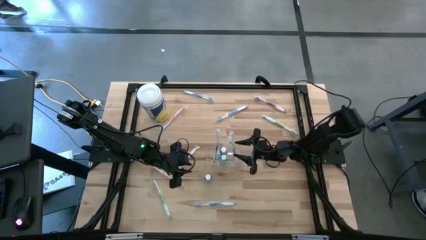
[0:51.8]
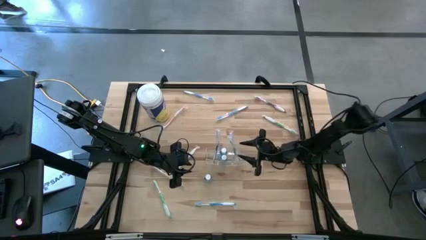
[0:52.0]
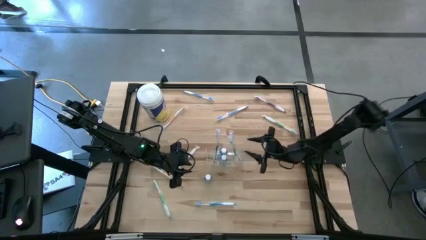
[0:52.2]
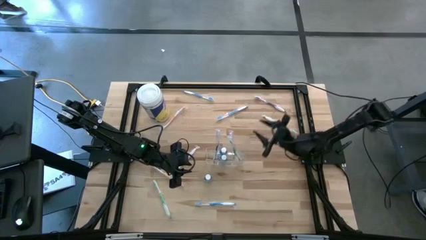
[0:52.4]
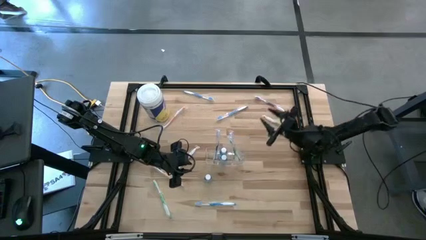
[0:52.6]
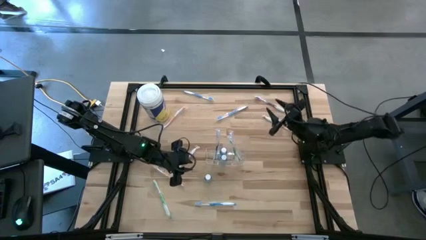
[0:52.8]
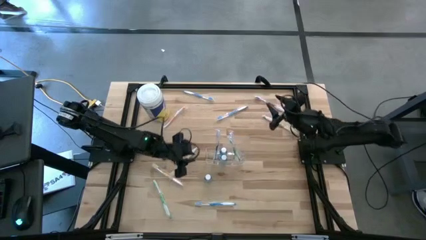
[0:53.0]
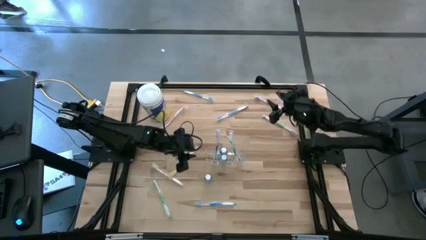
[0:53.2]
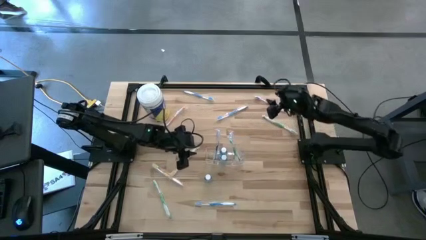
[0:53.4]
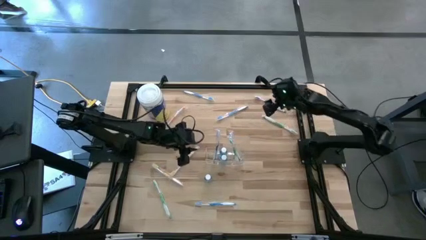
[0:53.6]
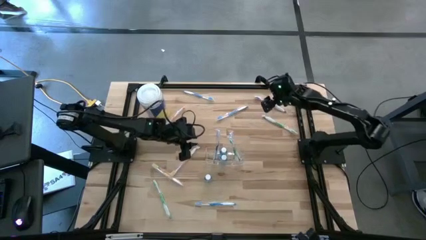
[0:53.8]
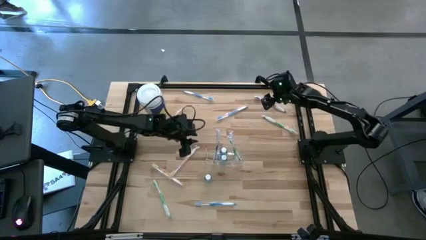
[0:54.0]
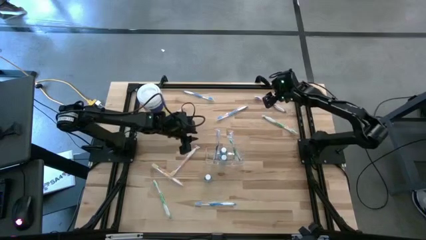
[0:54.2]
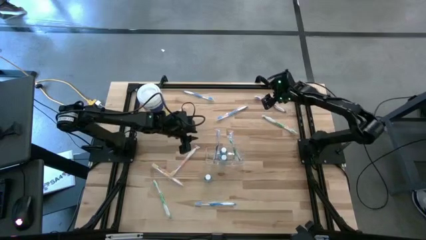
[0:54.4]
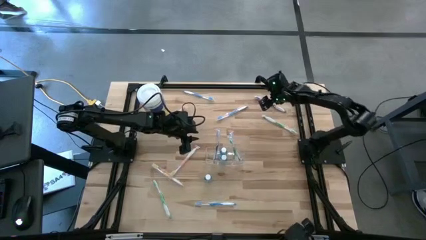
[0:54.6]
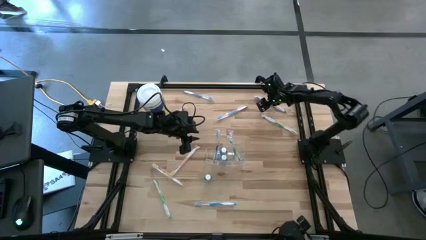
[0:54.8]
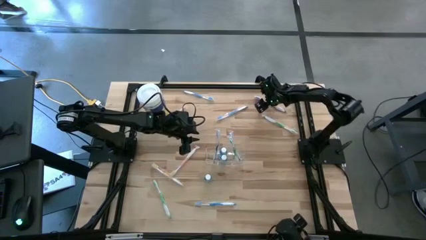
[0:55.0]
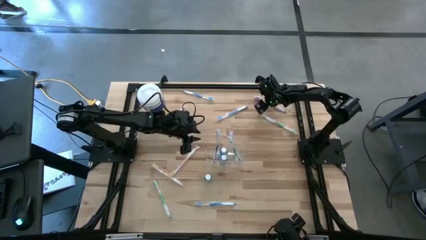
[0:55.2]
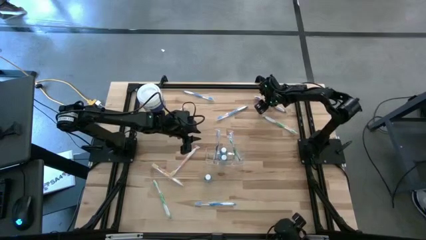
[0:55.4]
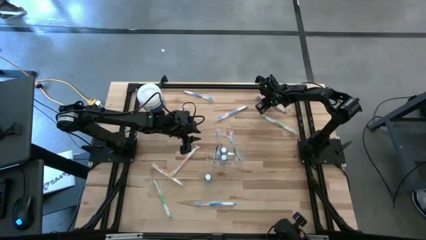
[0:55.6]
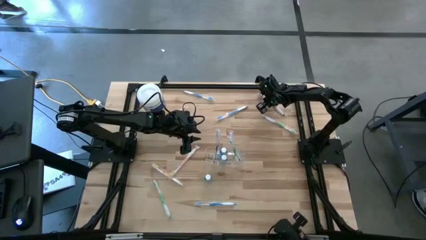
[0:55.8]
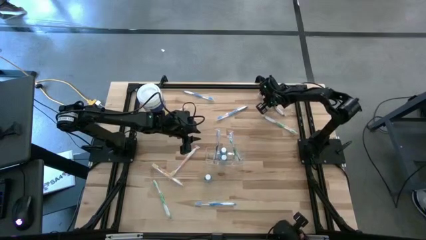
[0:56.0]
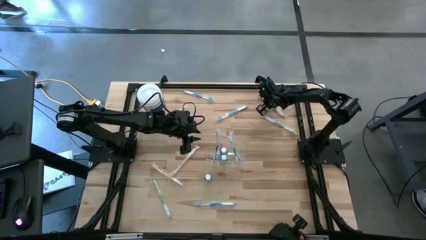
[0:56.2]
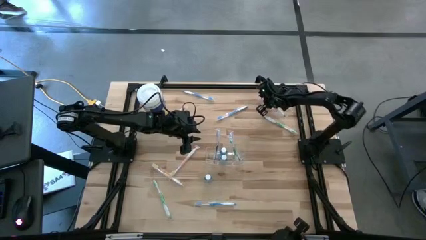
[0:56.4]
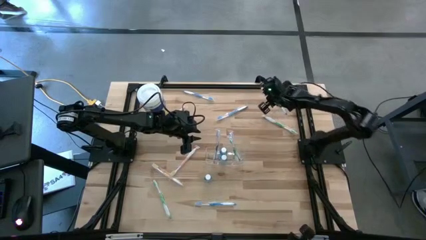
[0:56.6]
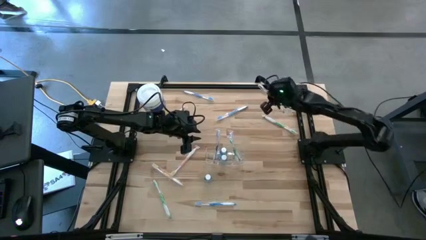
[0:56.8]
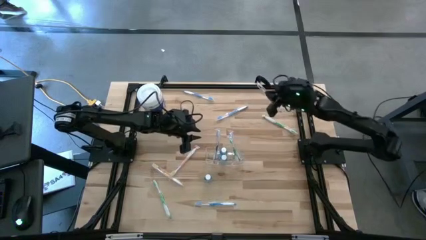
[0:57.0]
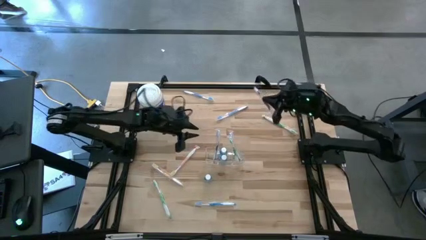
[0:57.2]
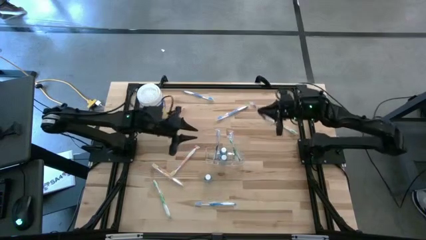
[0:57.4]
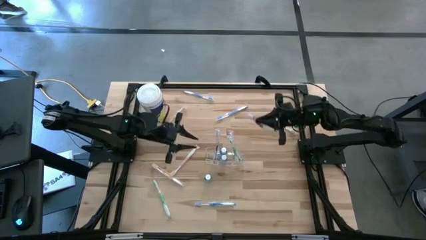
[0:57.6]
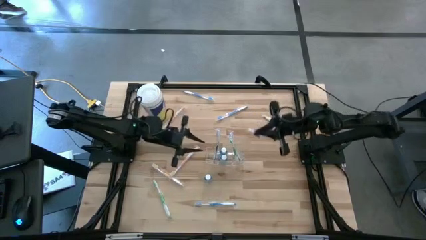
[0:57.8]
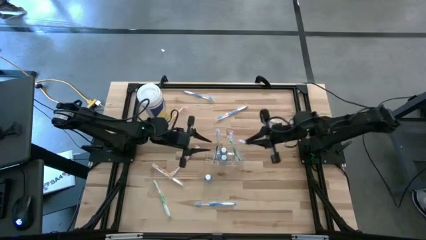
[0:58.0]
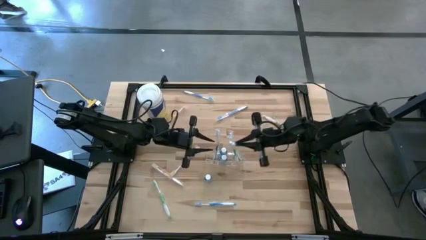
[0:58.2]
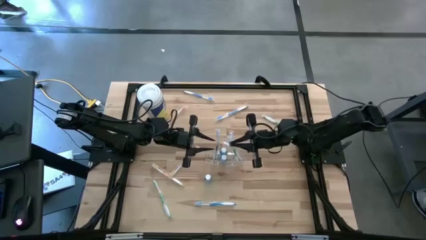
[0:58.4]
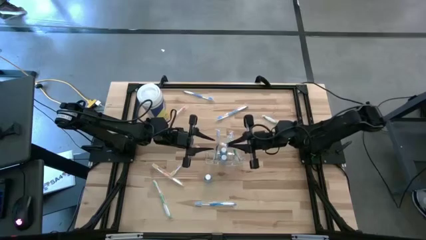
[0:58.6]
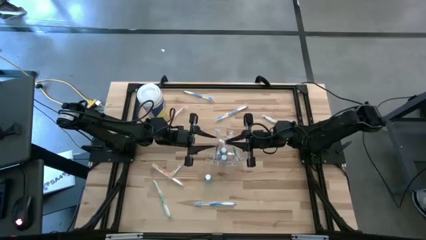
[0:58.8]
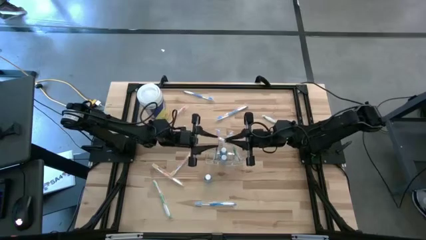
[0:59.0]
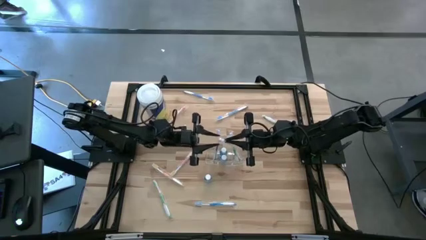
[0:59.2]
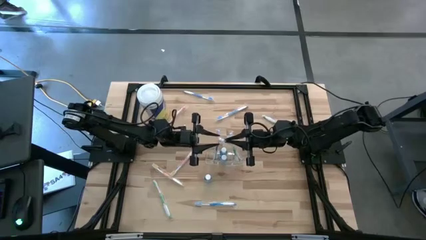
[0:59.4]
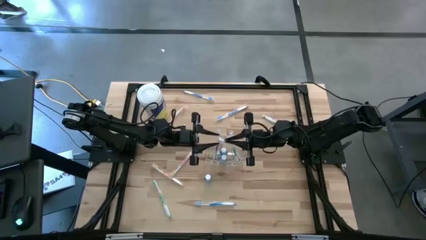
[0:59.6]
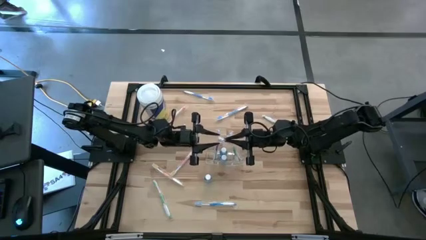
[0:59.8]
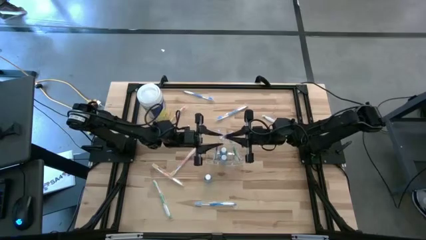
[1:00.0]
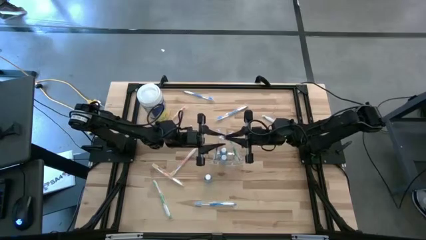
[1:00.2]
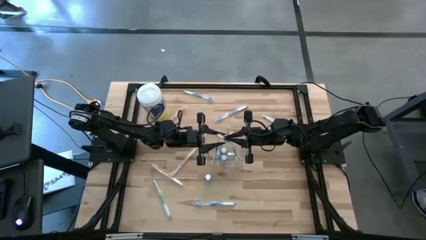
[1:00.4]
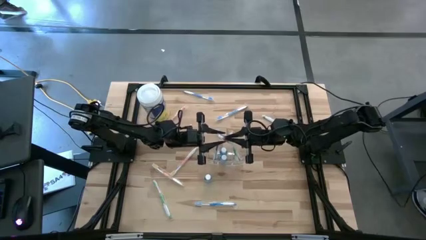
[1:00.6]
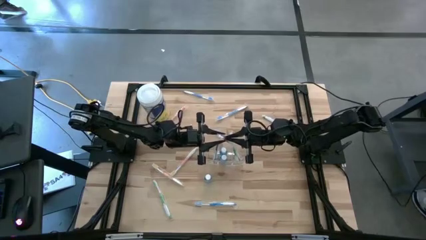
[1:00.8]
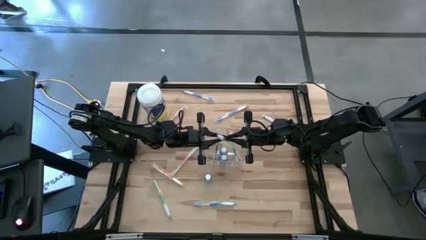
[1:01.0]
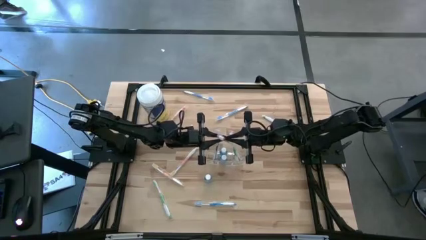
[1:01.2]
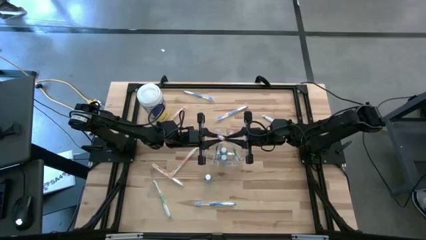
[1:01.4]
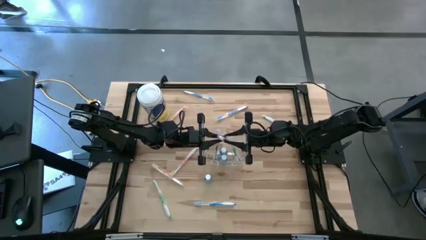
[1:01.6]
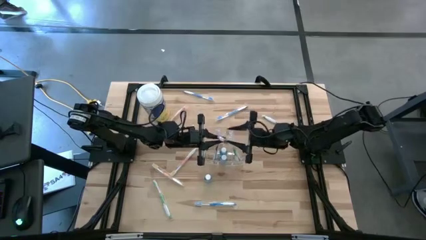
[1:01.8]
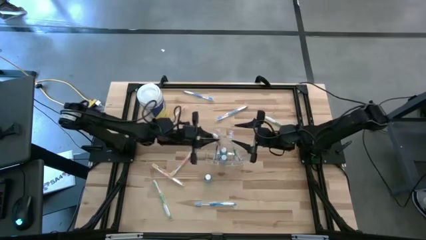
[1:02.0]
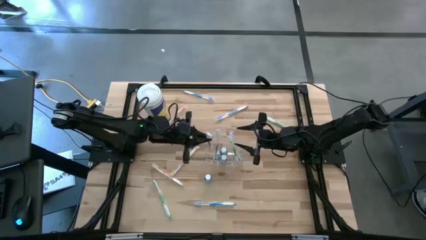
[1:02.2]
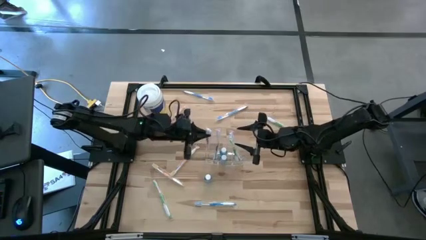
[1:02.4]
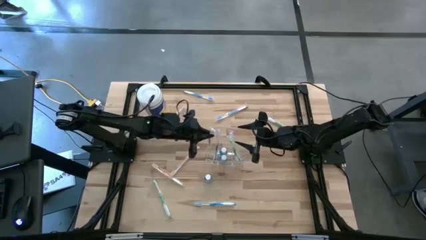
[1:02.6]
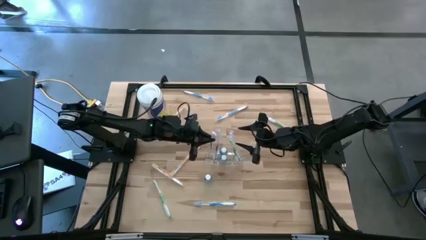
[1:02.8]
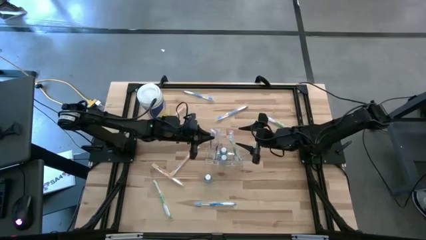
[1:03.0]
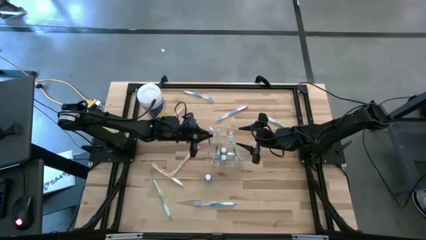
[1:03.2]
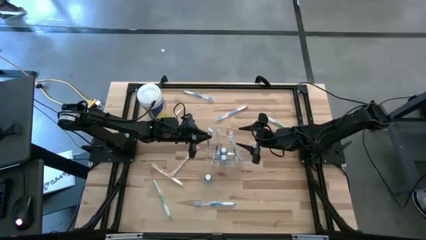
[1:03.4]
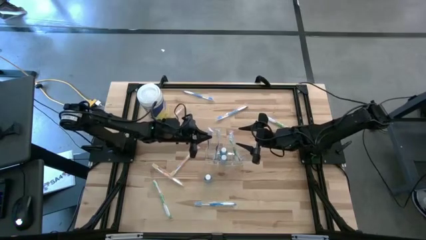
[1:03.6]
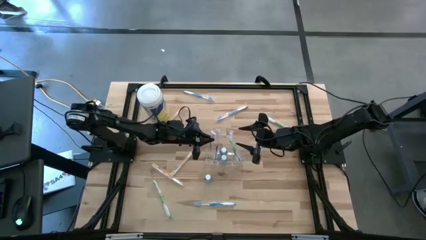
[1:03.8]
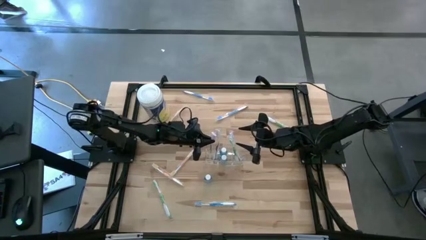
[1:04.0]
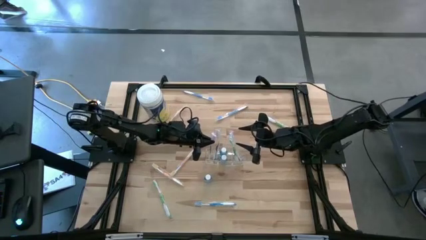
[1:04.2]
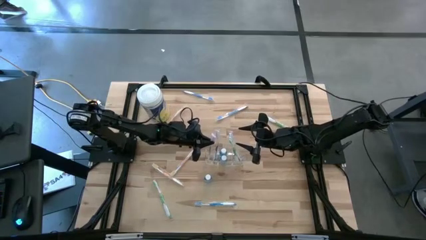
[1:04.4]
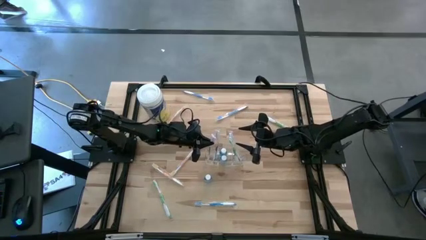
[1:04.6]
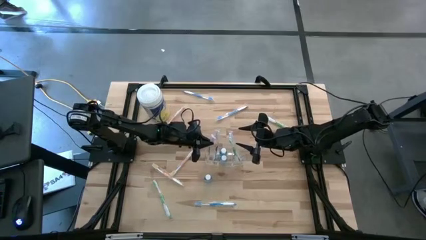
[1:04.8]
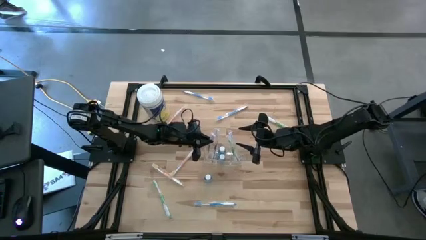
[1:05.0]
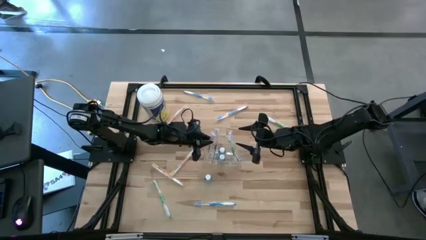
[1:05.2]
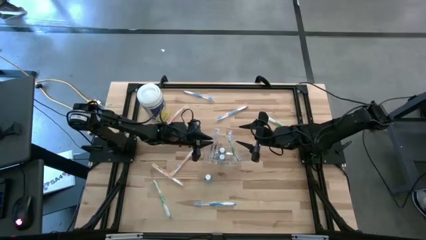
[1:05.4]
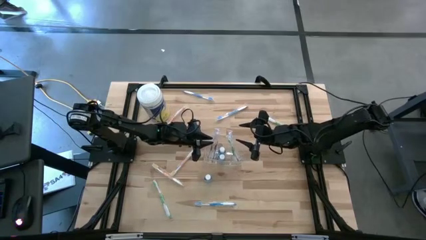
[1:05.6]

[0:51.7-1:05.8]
Task: Pick & Place toothbrushing station
Put the purple toothbrush into the transparent organizer

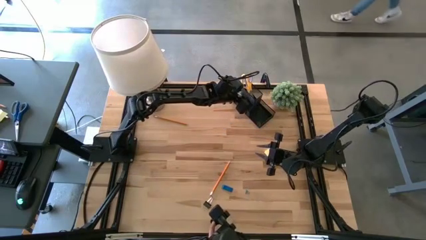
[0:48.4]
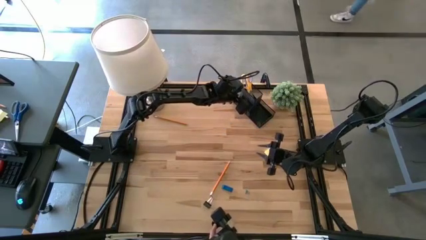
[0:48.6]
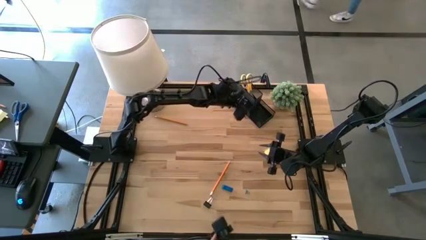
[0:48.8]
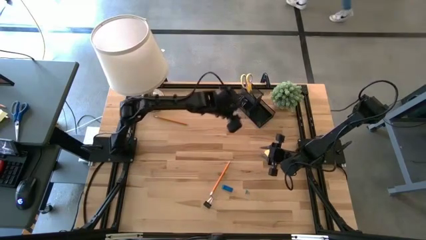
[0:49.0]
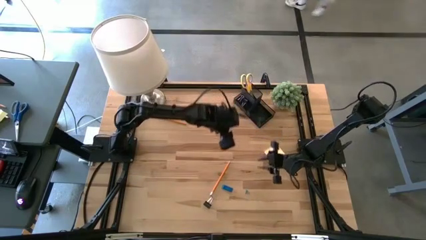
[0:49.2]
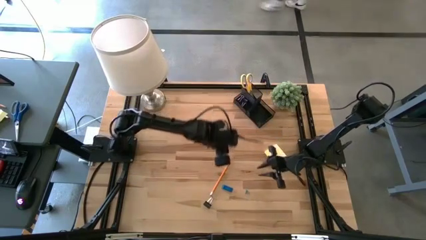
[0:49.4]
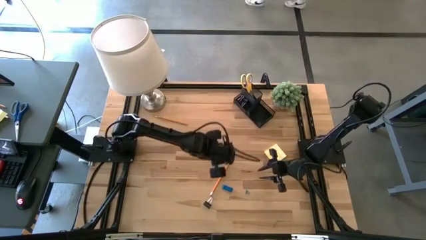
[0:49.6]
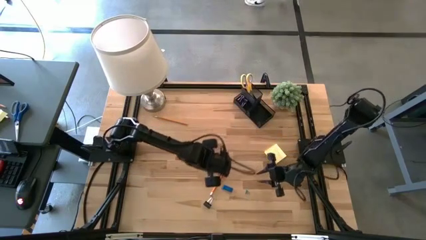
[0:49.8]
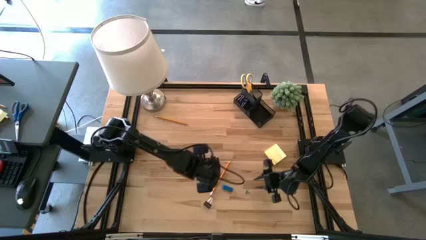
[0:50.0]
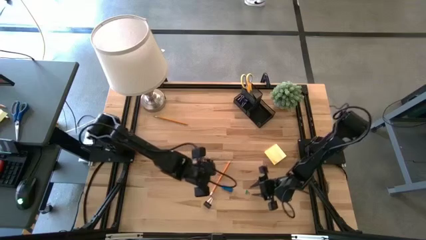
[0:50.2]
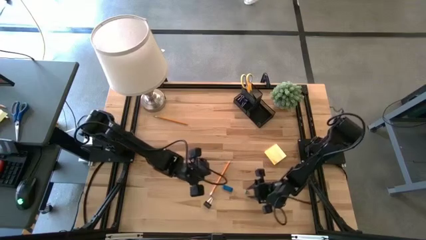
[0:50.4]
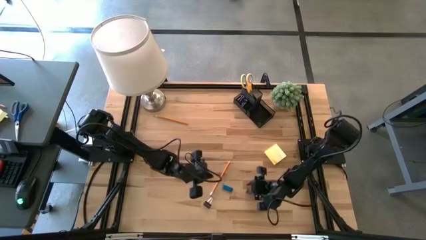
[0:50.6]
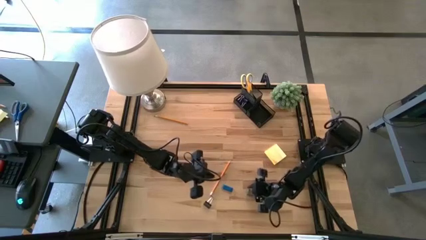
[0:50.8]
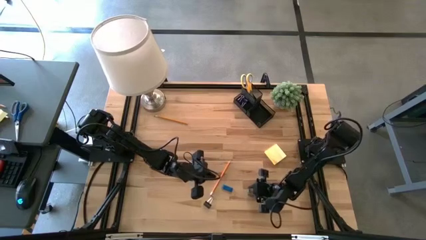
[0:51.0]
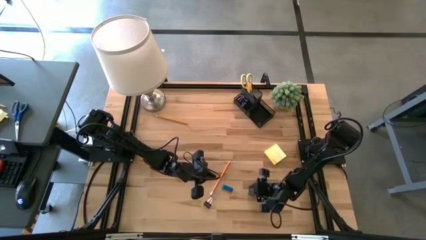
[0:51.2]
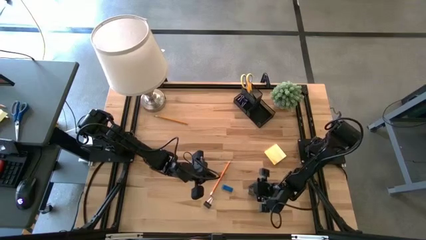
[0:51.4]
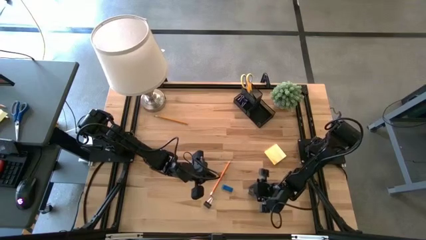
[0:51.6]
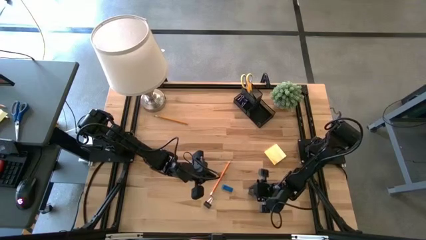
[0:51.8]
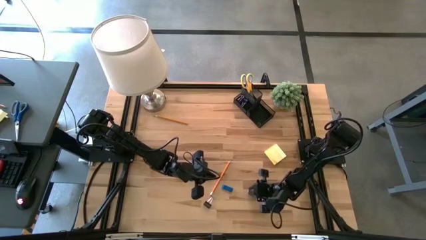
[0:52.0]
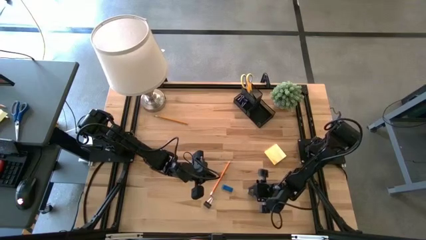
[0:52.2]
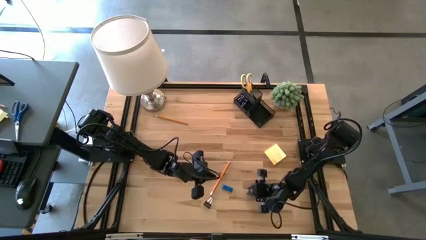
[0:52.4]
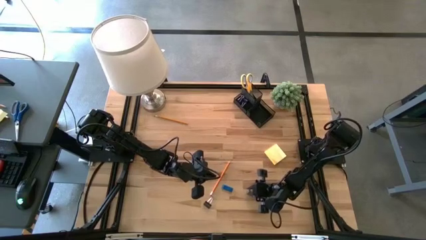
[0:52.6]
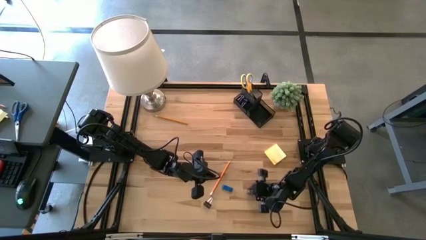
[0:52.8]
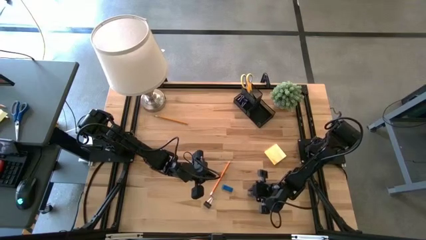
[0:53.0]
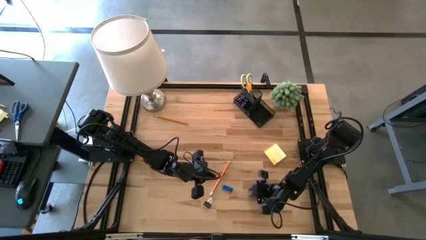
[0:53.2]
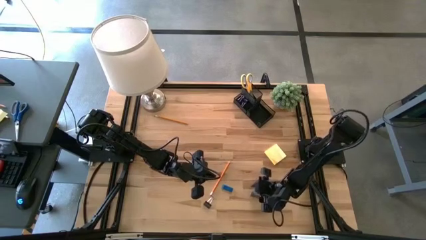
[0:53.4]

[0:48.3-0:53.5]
Task: Pick and place office supplies into organizer
Put the blue binder clip into the desk organizer
